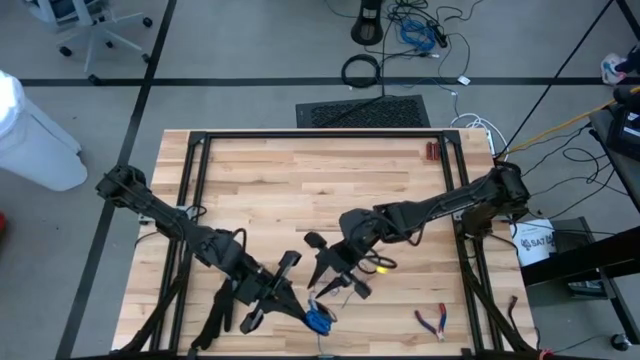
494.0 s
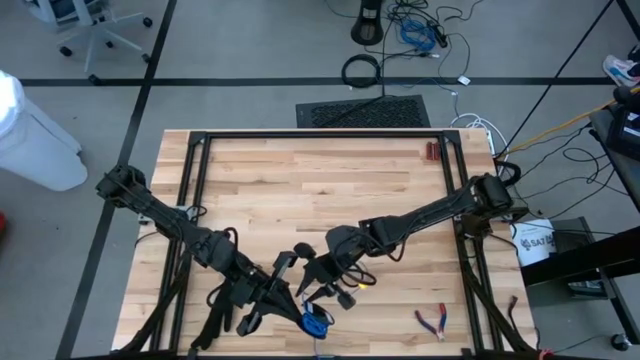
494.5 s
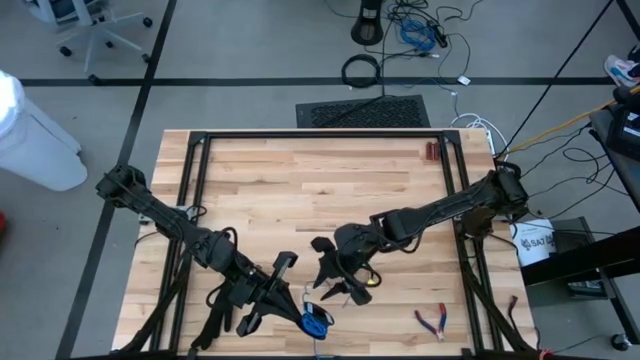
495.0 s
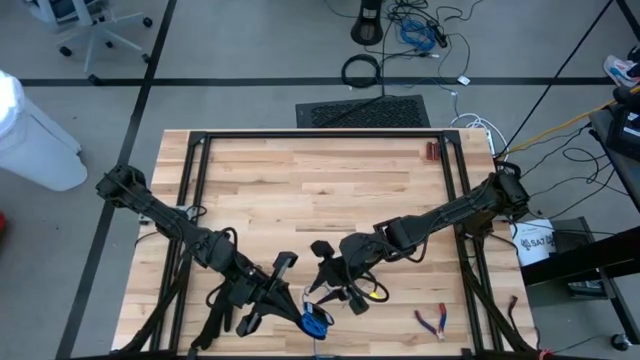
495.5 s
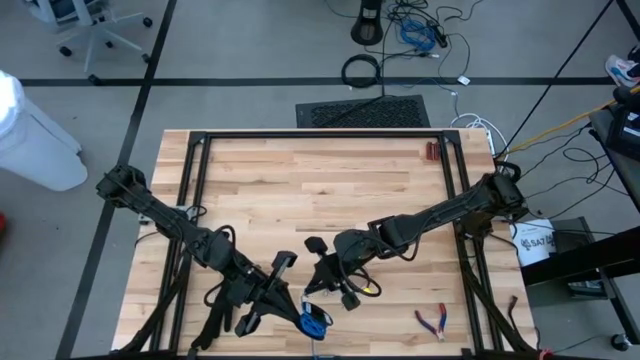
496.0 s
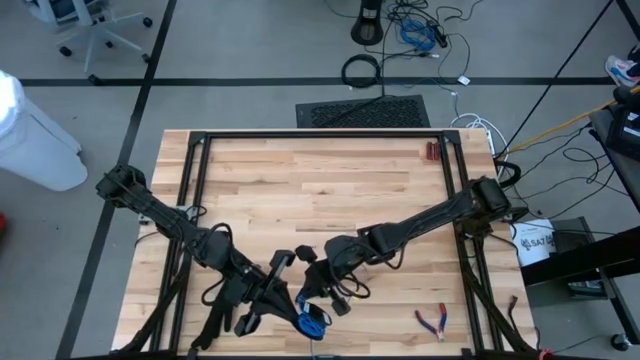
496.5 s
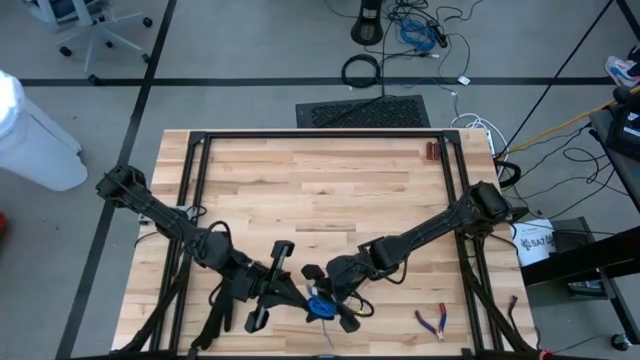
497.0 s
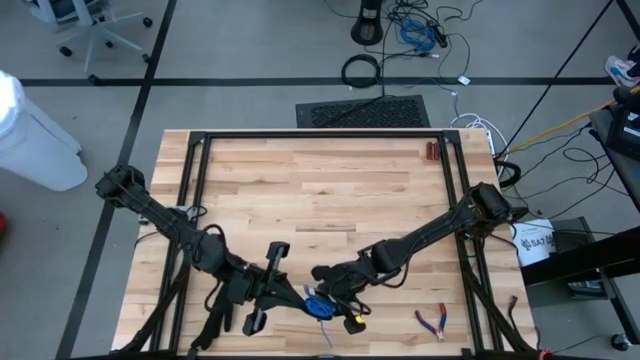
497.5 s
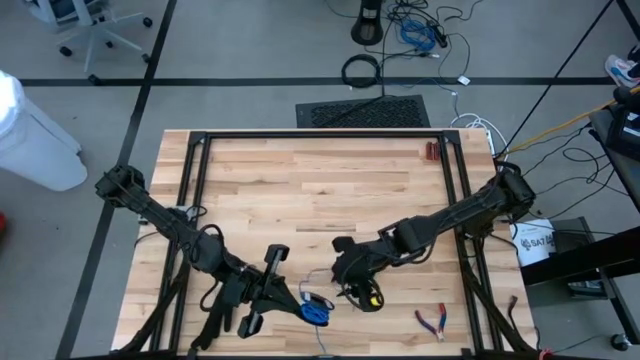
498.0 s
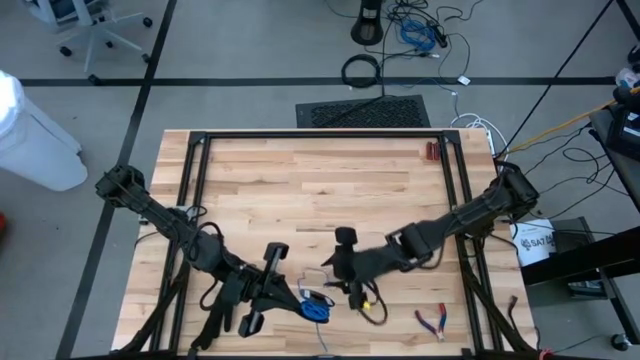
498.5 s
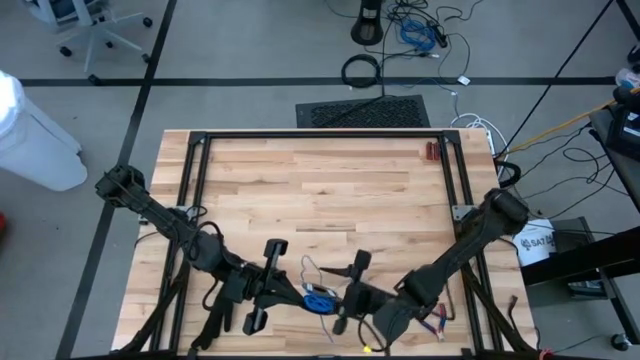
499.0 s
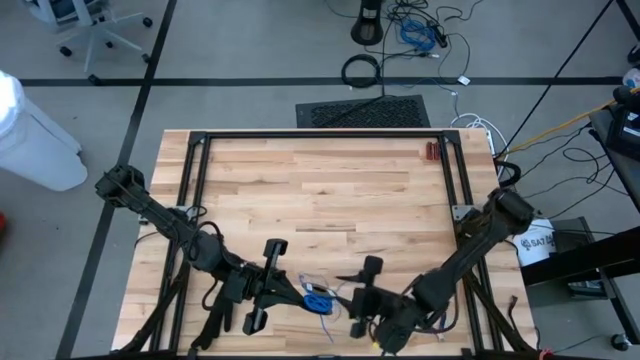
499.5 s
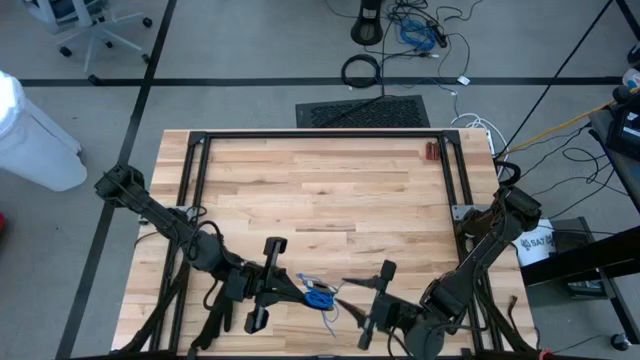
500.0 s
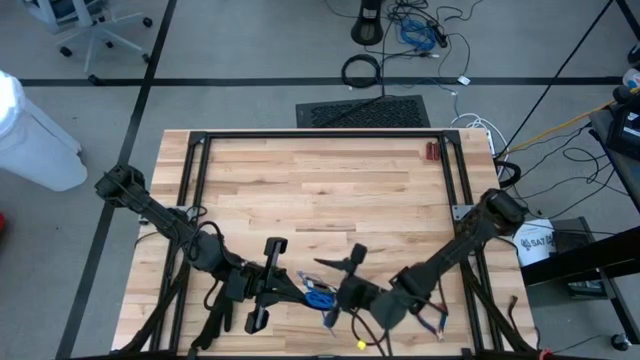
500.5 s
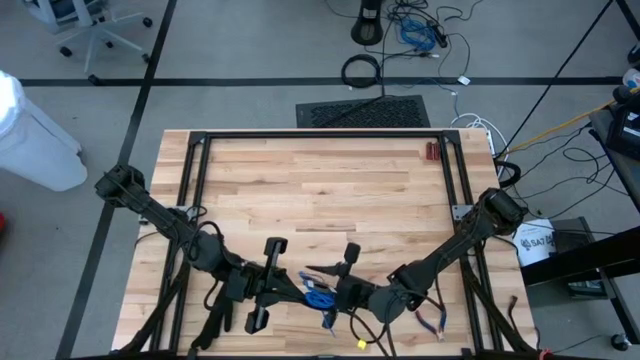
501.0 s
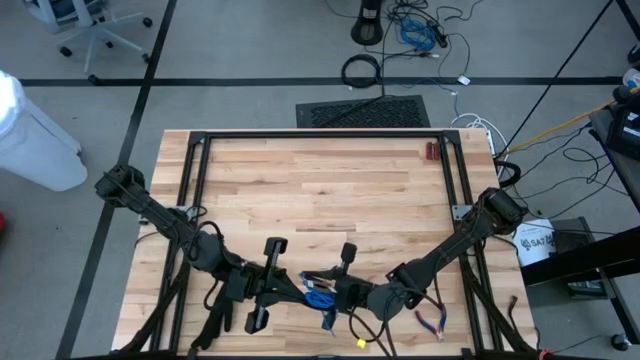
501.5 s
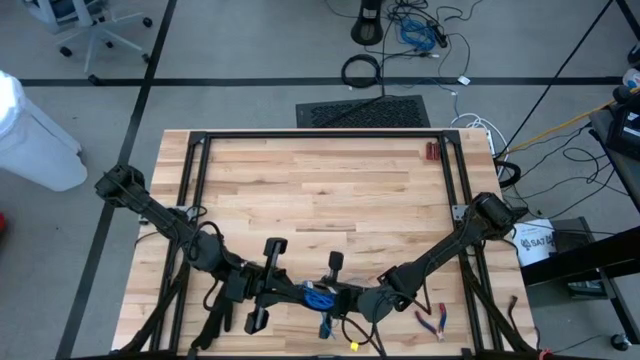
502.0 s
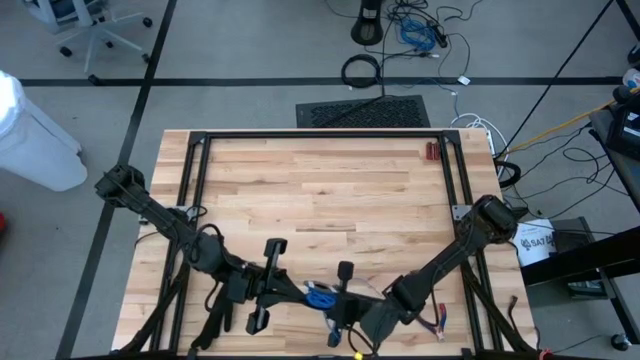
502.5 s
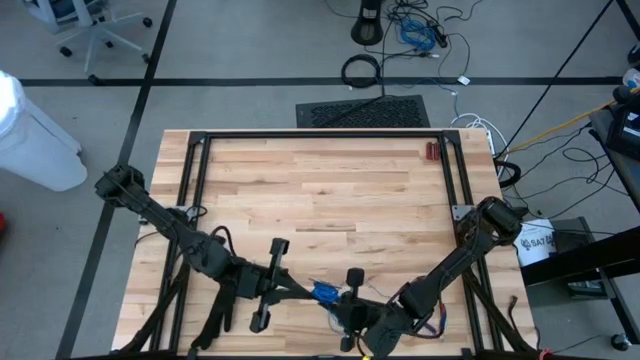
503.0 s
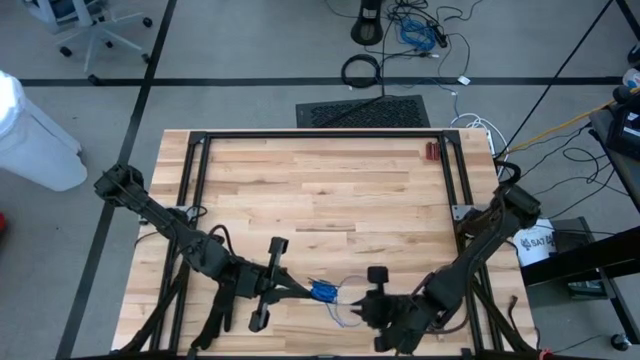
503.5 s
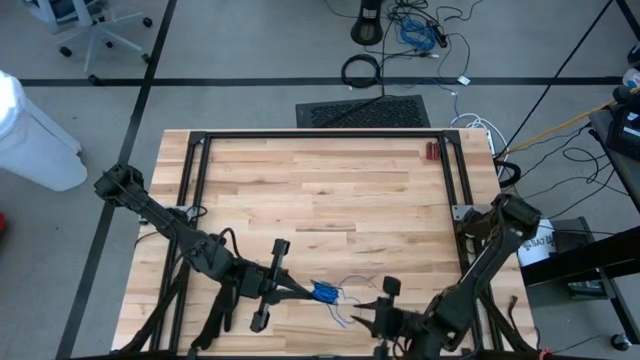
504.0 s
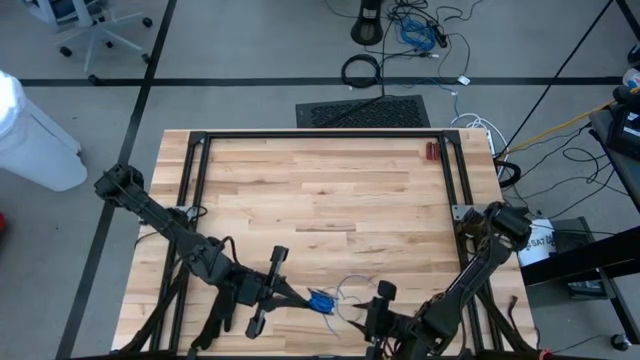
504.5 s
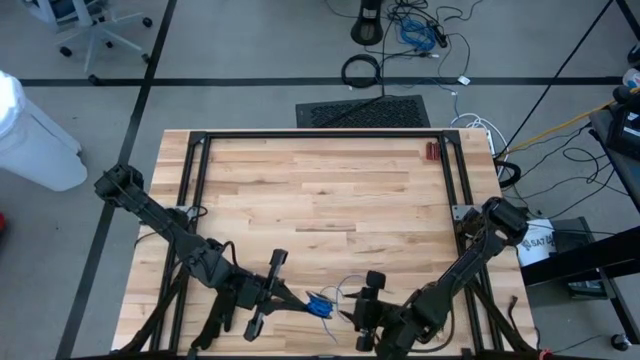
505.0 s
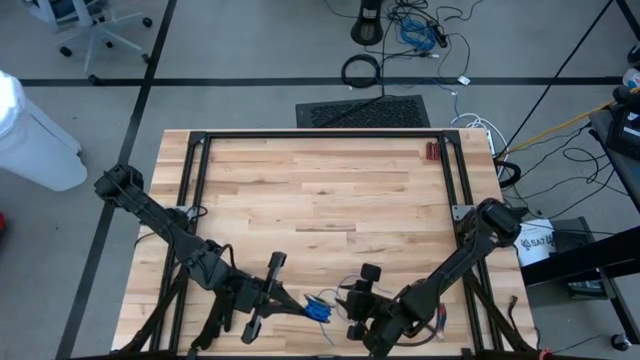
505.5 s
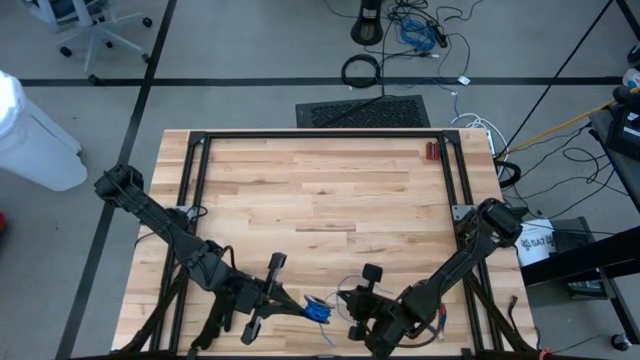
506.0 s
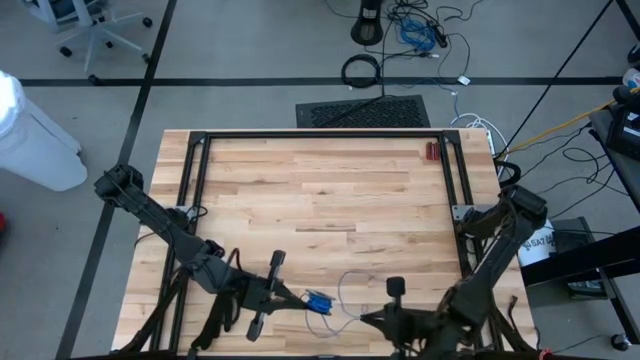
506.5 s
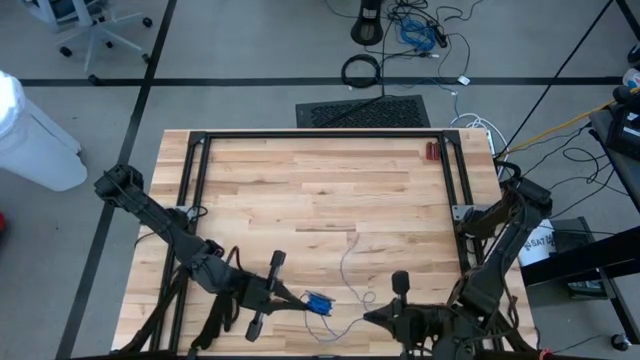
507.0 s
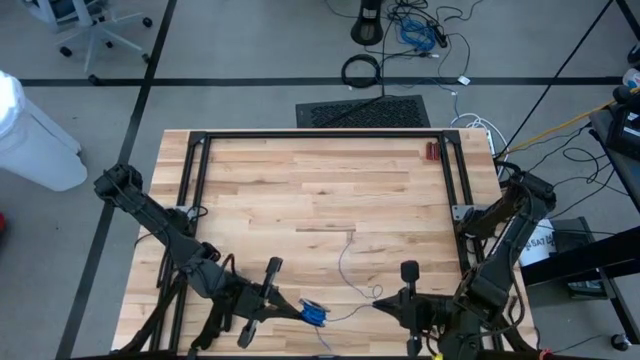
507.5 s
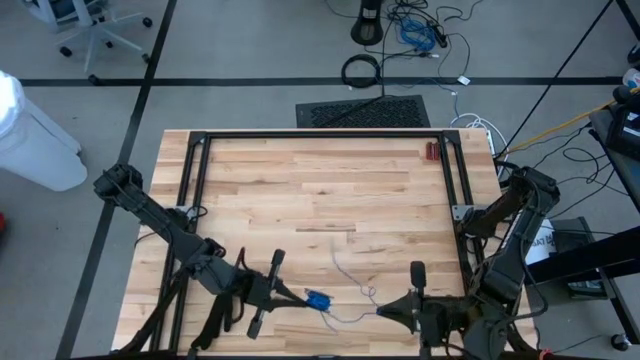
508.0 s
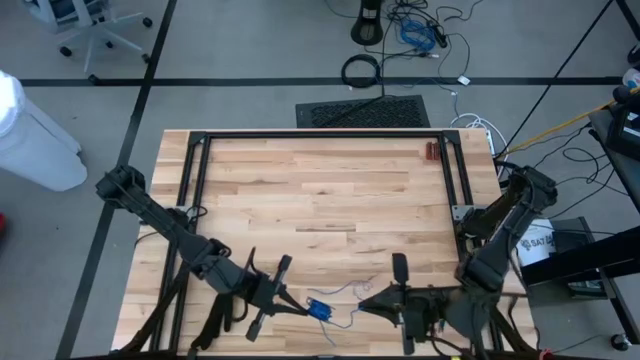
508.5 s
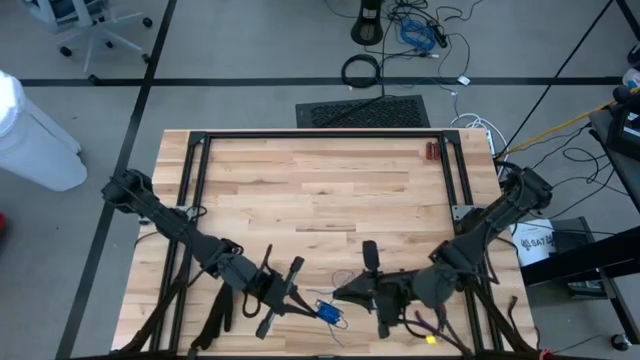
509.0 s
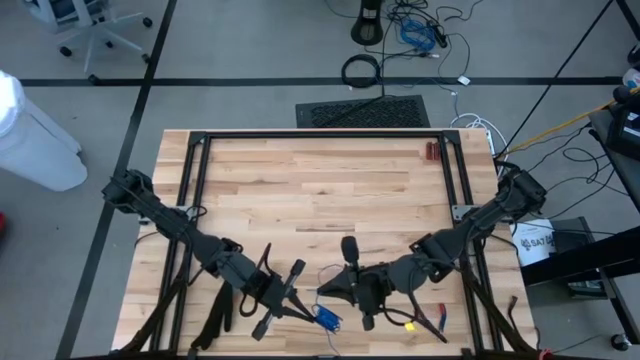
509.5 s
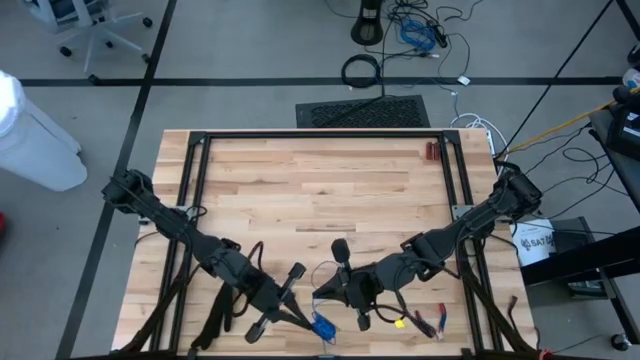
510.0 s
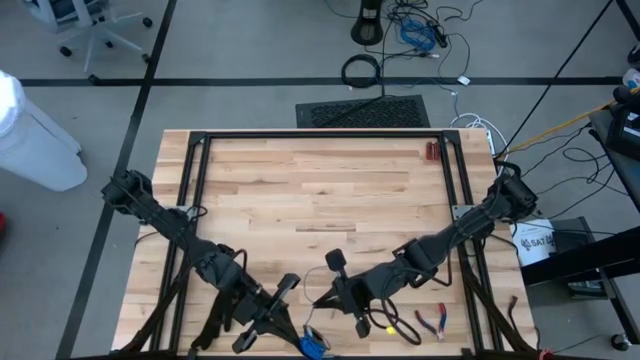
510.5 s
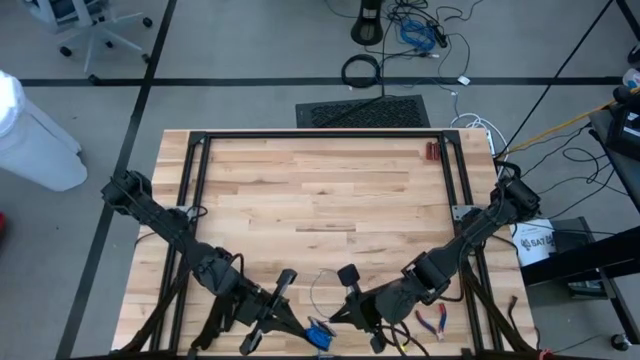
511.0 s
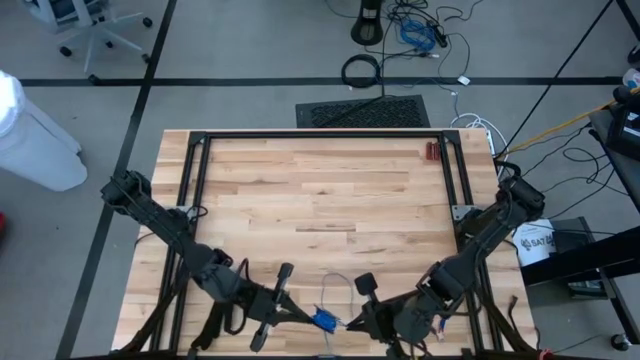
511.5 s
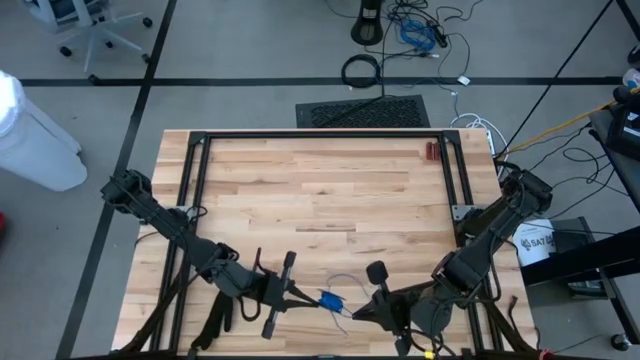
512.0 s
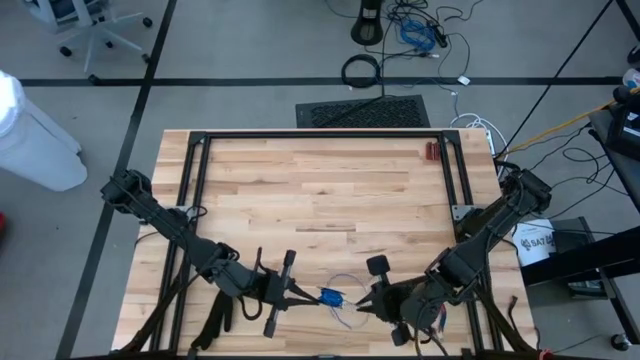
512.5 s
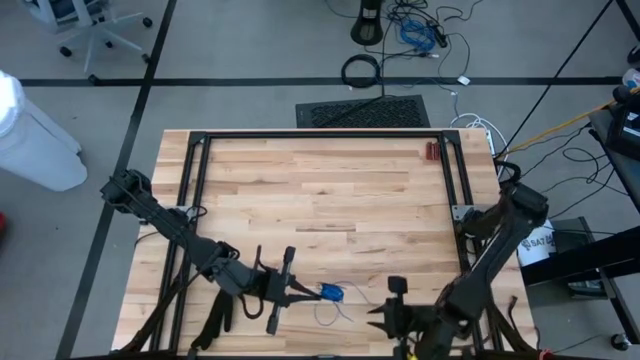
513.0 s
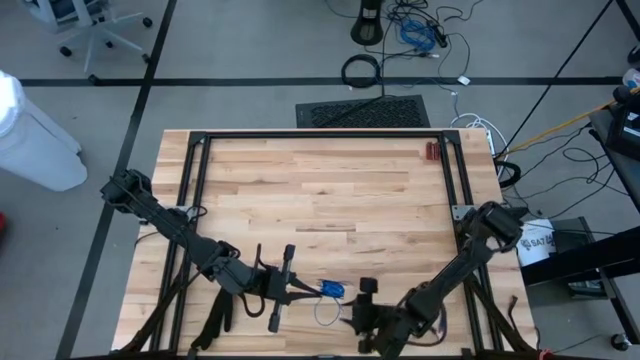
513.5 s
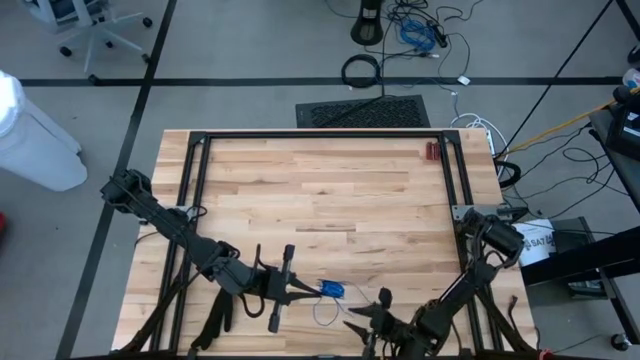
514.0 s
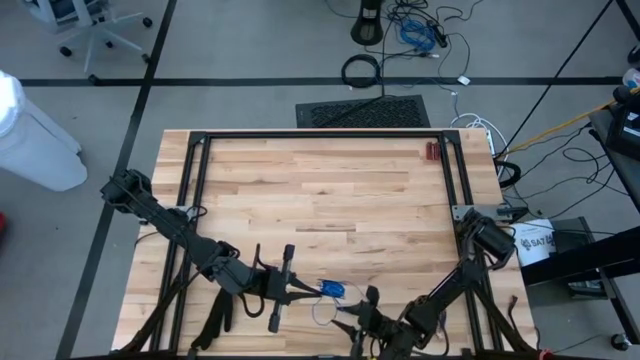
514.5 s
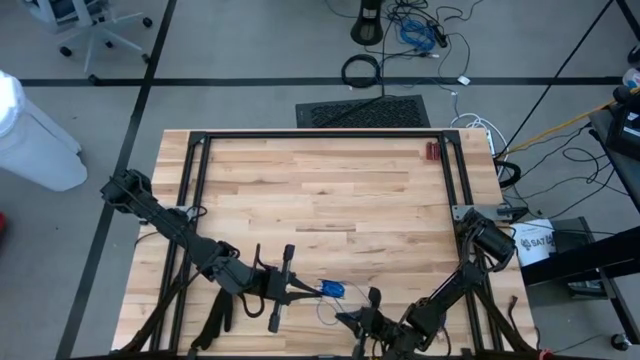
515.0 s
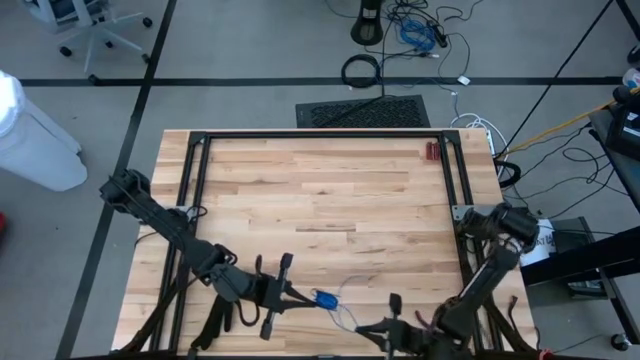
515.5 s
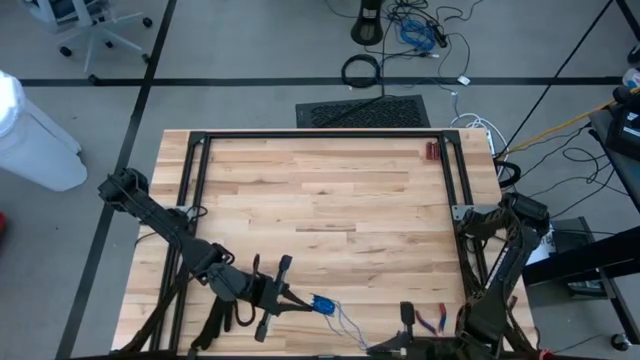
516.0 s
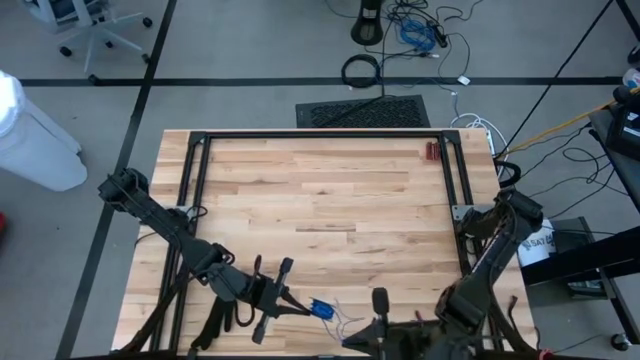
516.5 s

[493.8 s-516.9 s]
Task: Coil cords
Coil the blue wire onto the black spool
